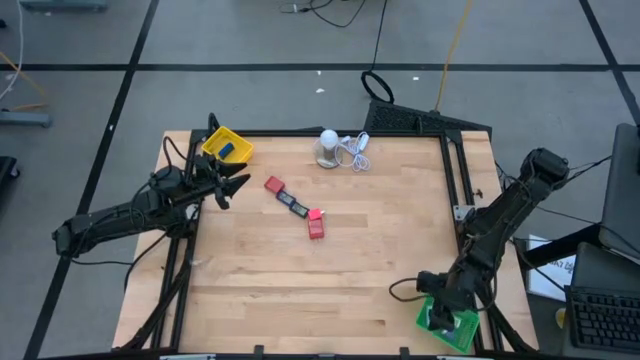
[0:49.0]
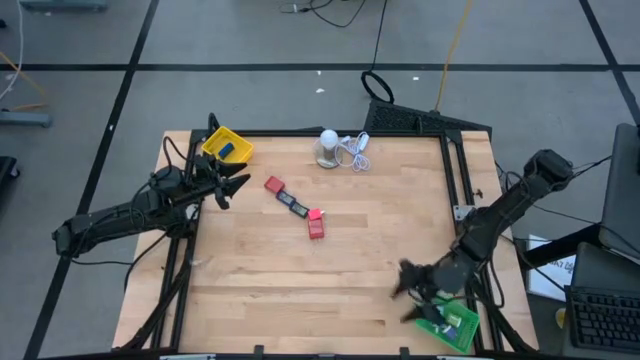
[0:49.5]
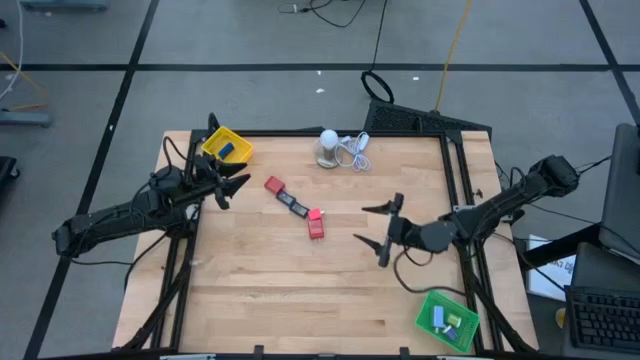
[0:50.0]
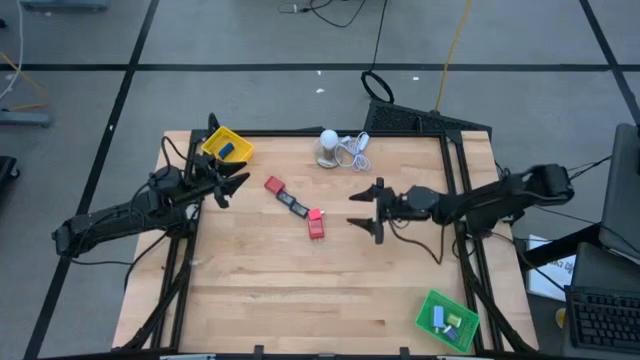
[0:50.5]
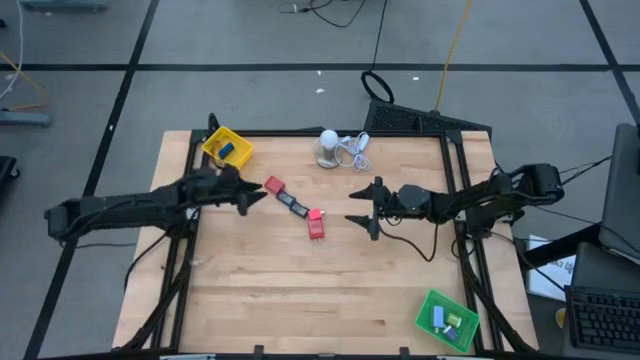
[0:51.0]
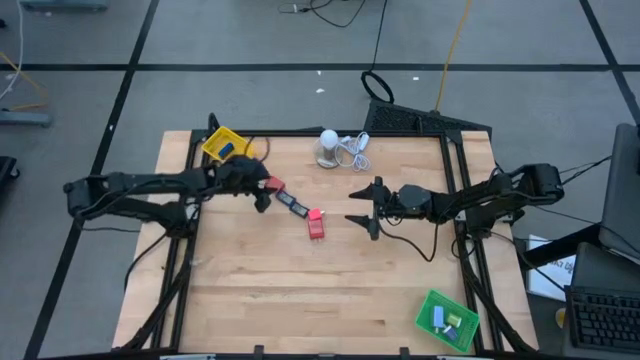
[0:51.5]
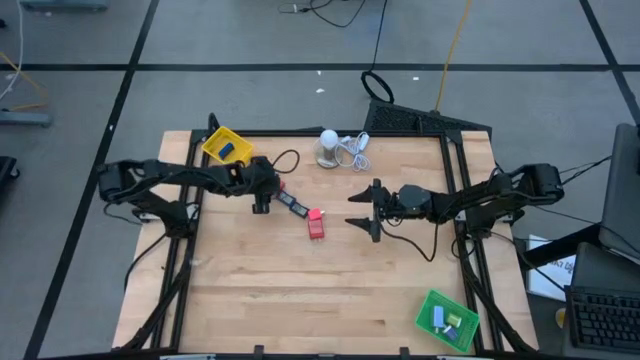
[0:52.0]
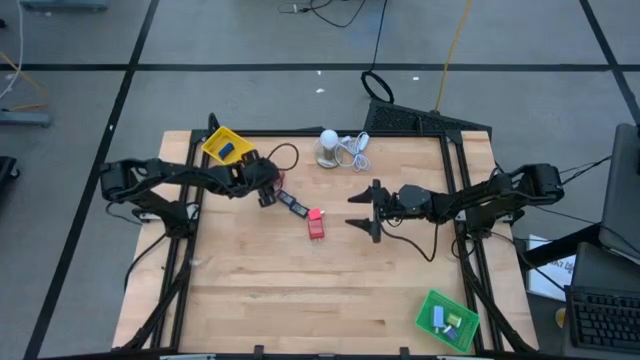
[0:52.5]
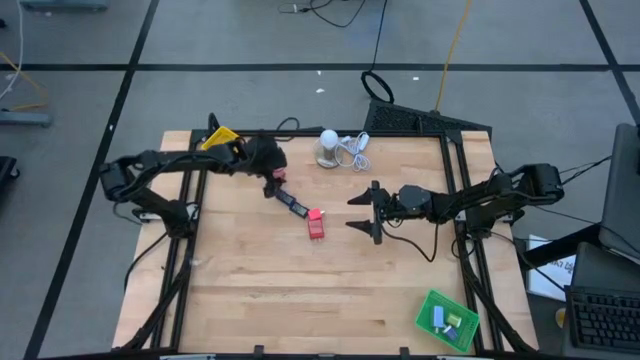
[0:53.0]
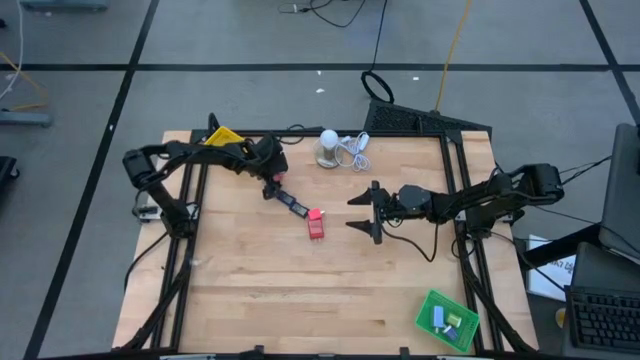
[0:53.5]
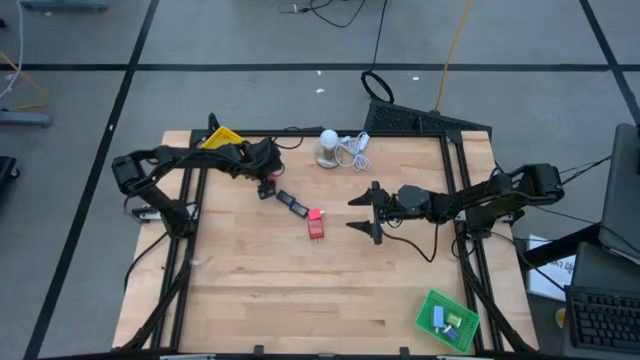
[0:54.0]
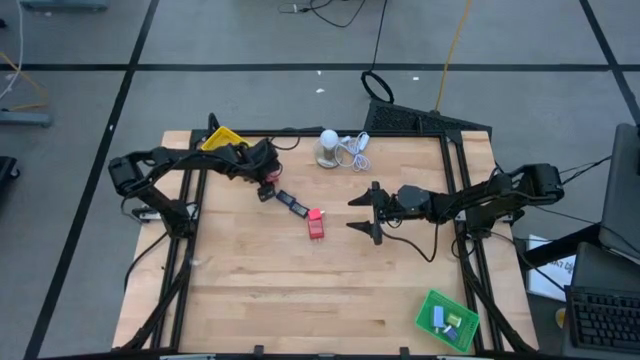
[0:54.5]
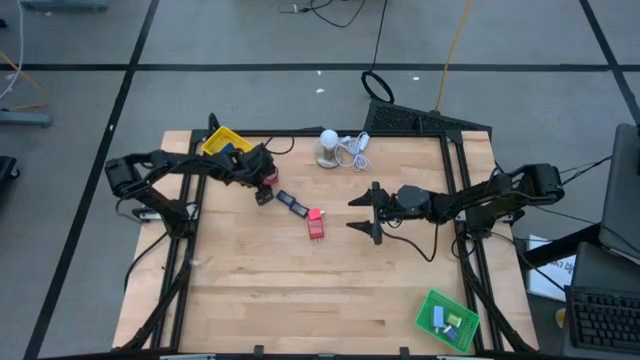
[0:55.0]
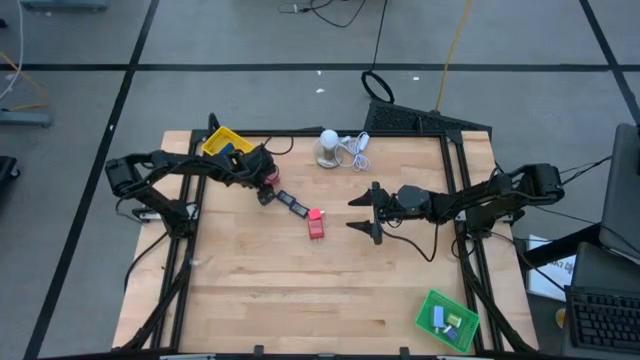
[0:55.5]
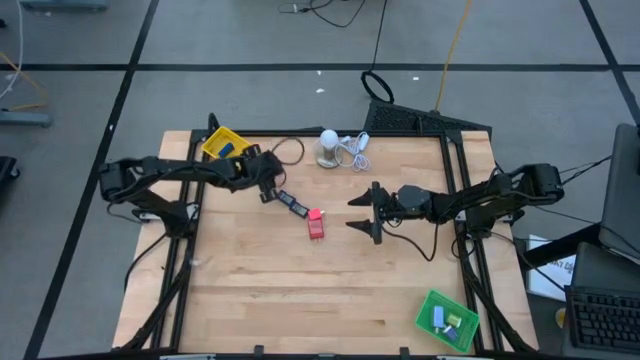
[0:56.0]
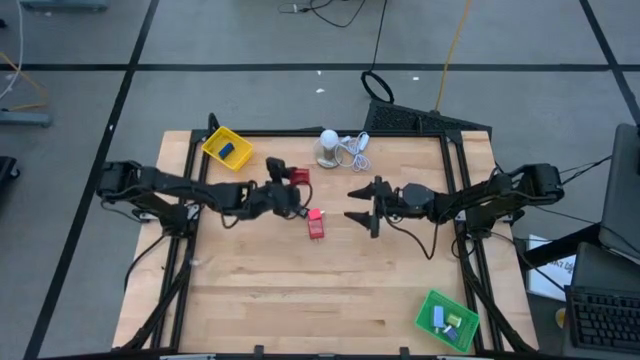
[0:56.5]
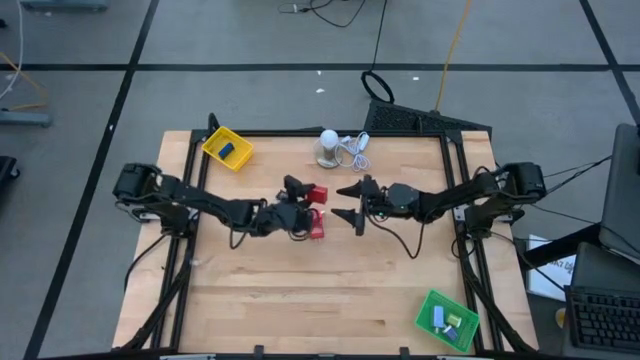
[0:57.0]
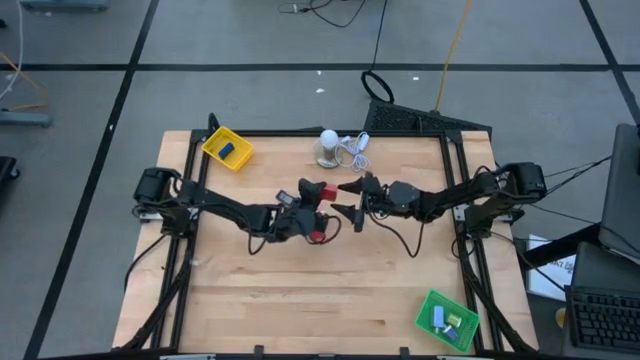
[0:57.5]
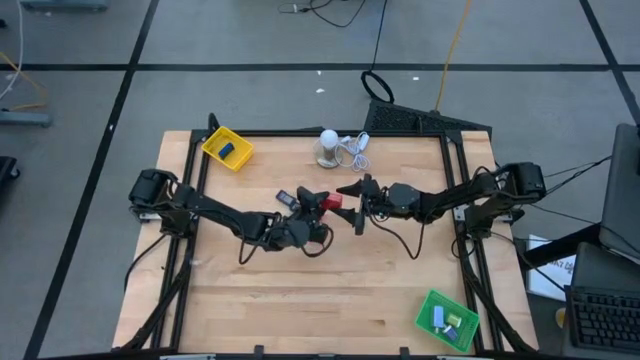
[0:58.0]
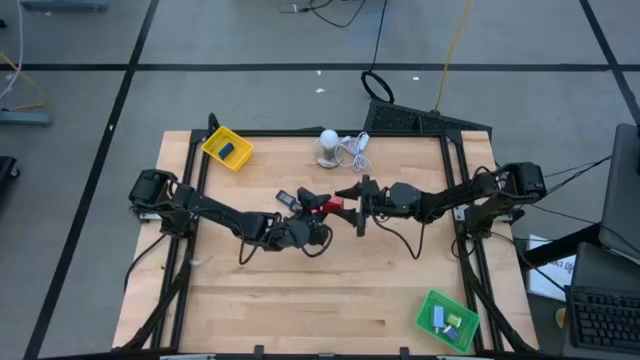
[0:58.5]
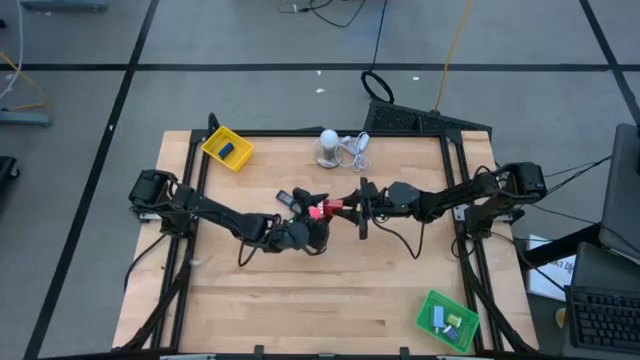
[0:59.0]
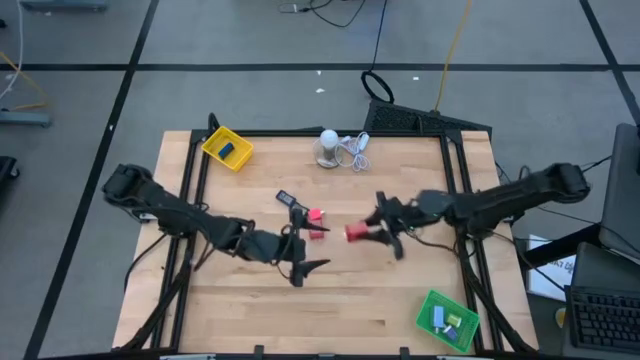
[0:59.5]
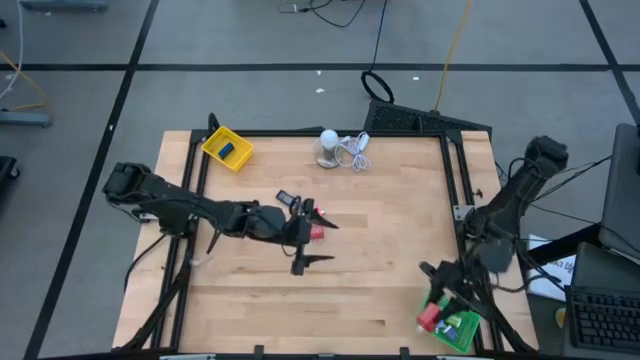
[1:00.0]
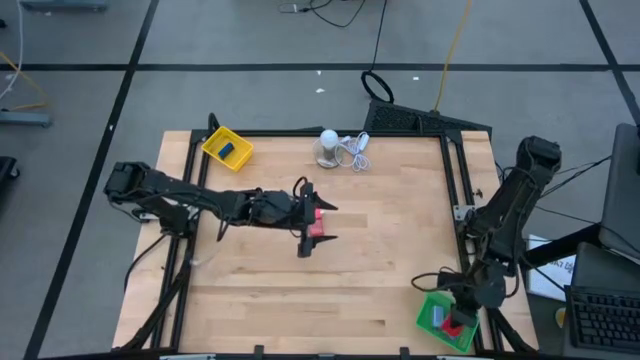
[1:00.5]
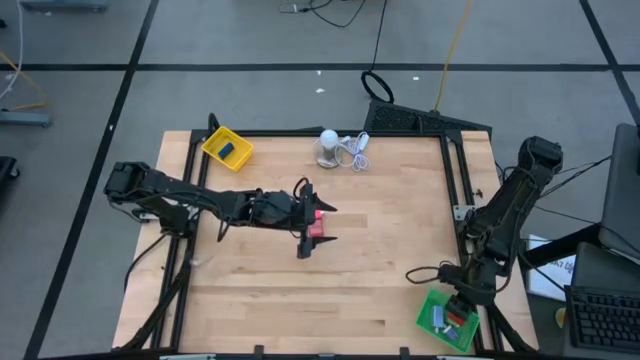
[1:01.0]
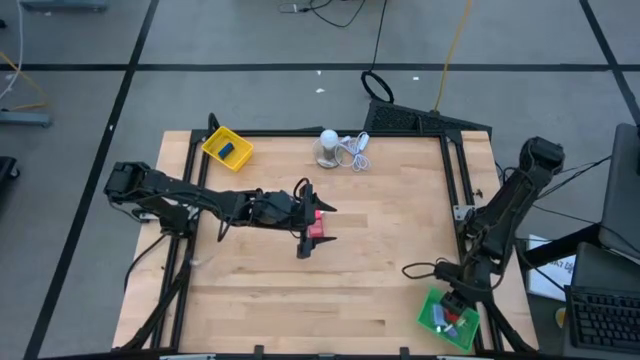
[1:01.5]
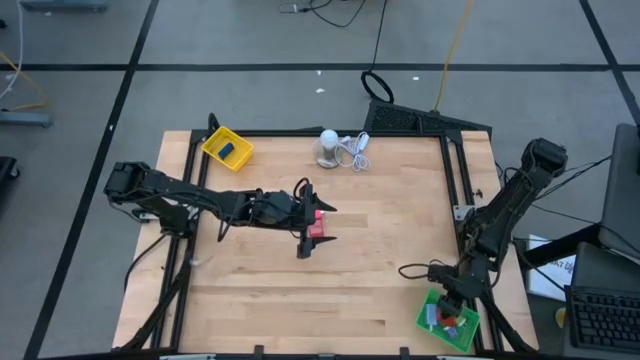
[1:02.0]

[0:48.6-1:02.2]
Task: Pick & Place Office items
Put the top red charger adapter into the green bin

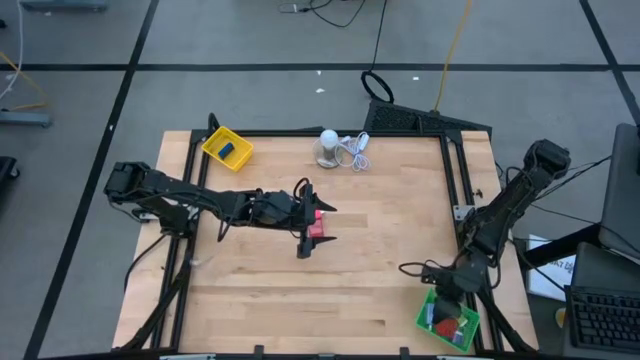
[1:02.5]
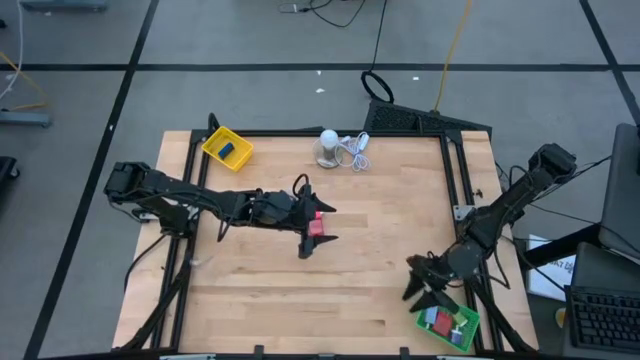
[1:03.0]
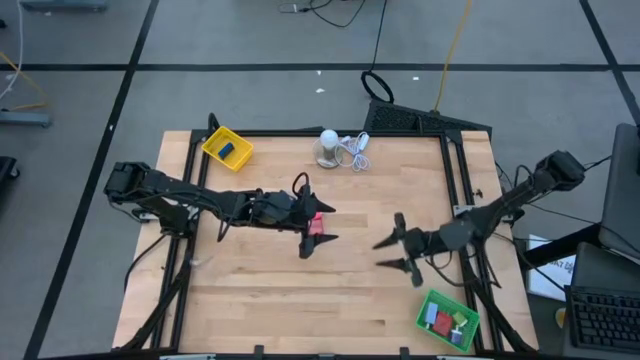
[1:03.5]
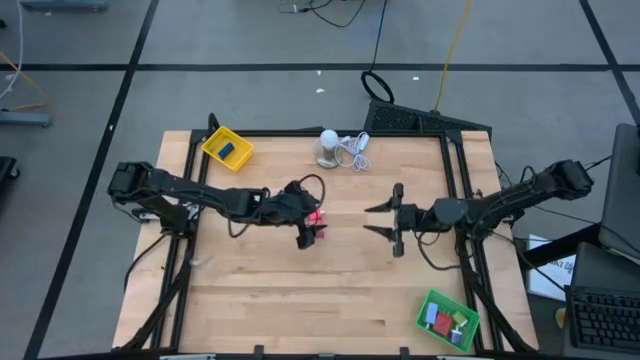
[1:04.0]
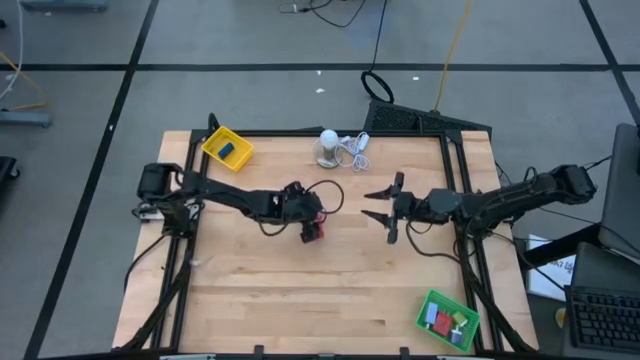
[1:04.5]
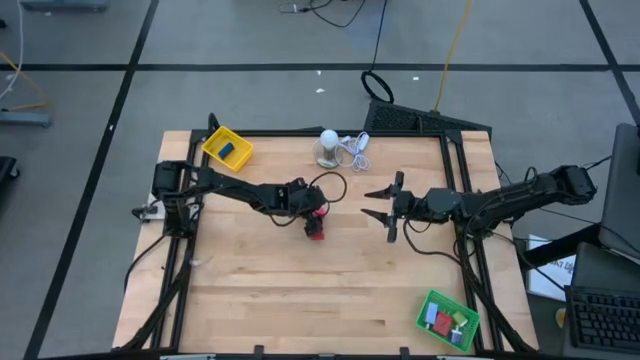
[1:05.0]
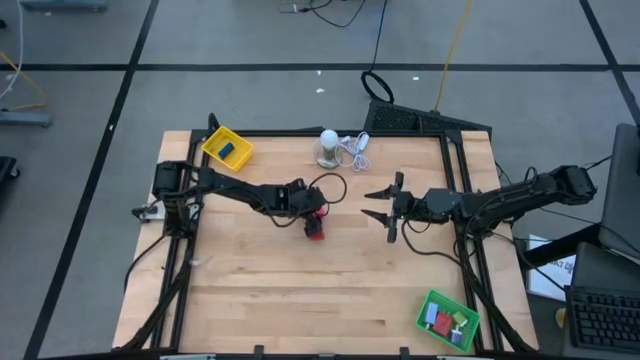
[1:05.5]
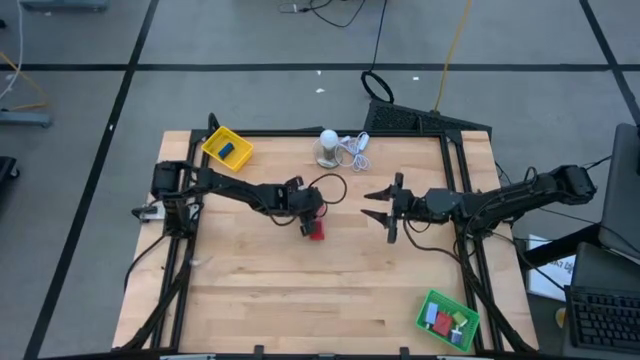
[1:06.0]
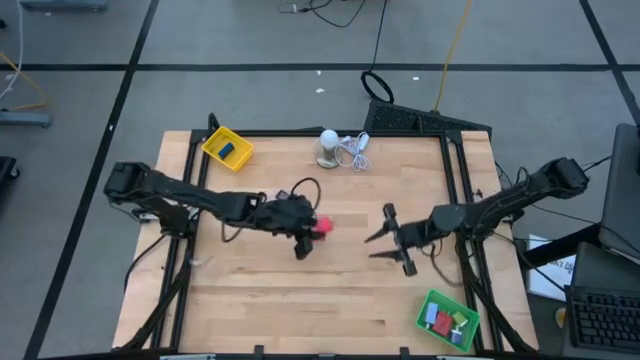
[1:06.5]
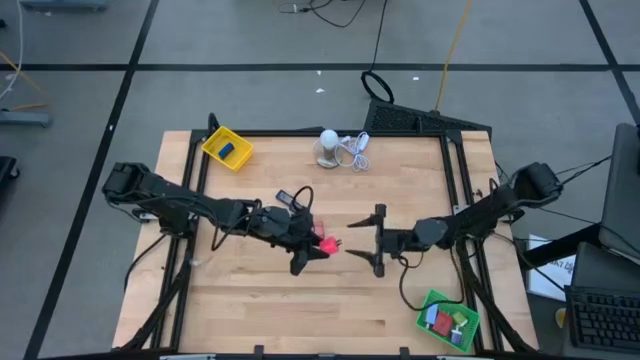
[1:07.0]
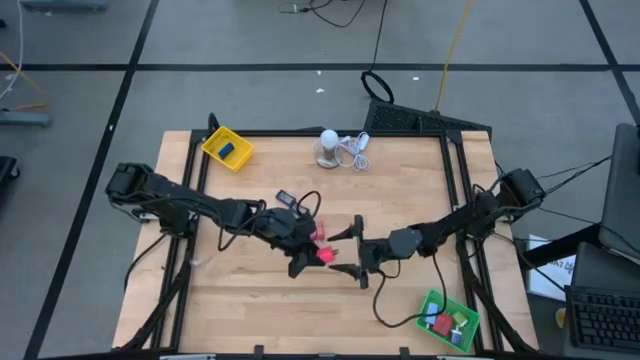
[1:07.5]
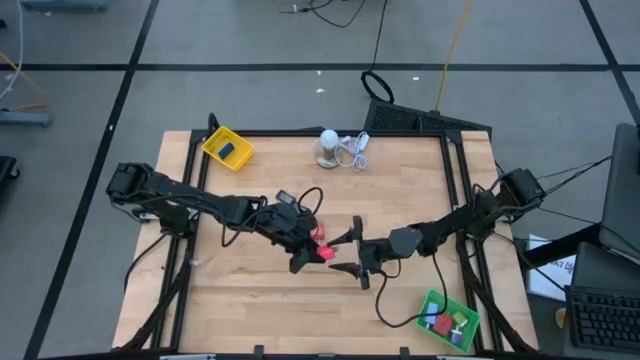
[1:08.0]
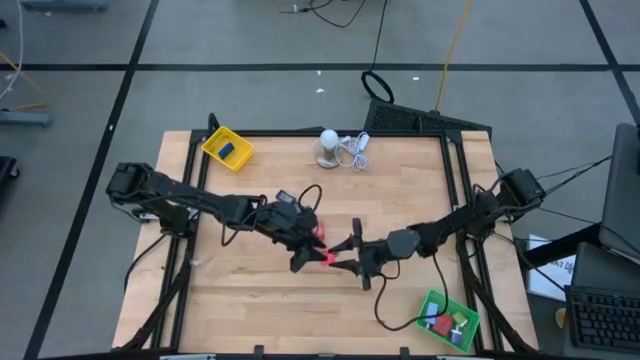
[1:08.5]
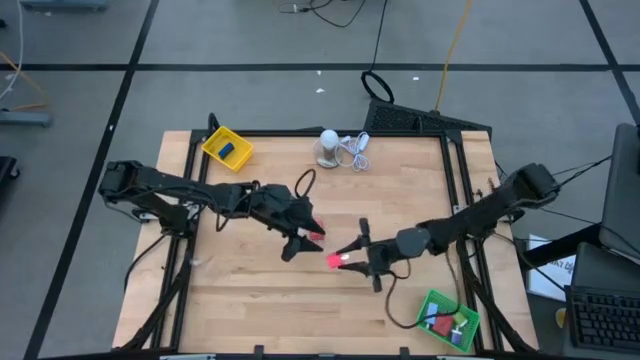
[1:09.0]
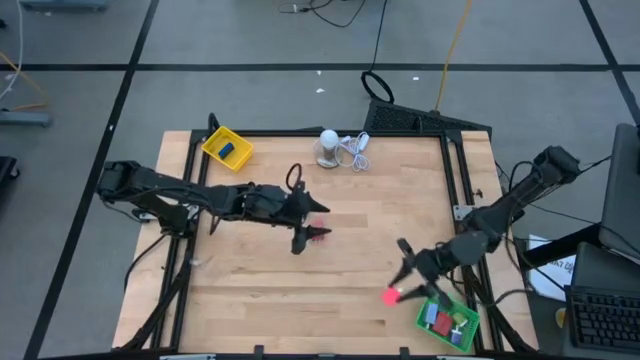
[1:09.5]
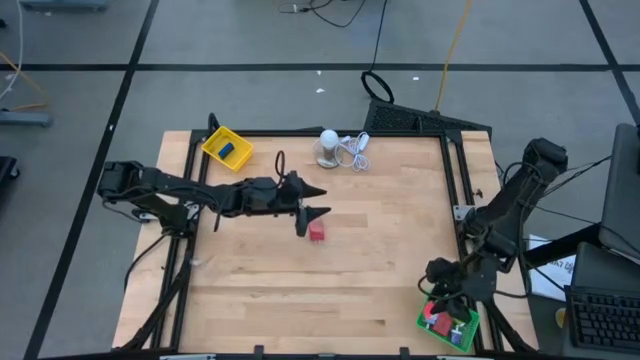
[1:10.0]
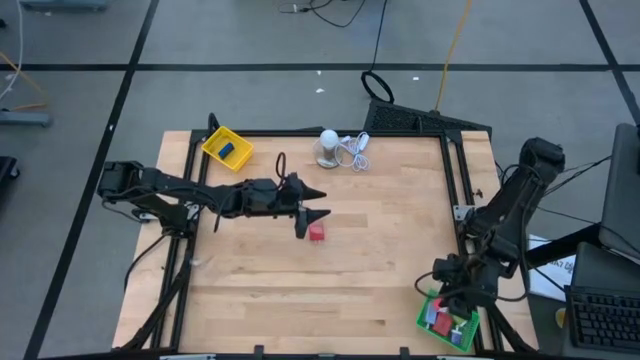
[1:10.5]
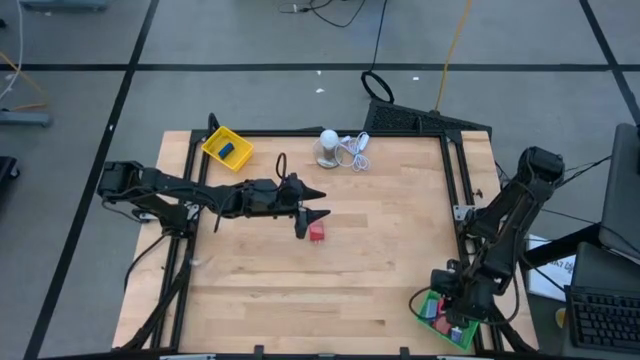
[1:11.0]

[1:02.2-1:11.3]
Put the pink orange charger adapter into the green bin
